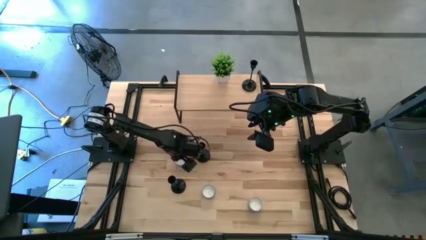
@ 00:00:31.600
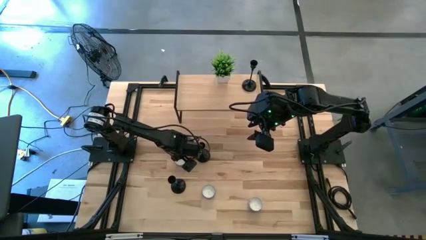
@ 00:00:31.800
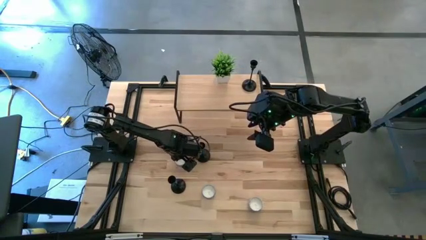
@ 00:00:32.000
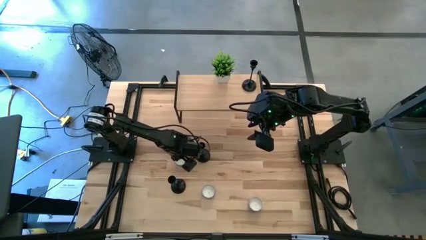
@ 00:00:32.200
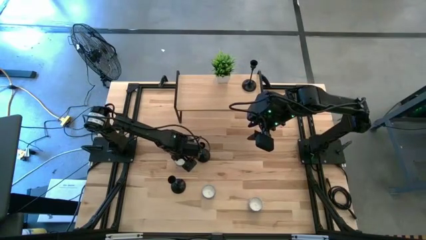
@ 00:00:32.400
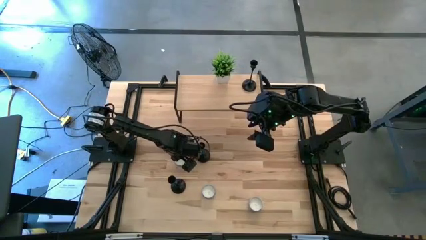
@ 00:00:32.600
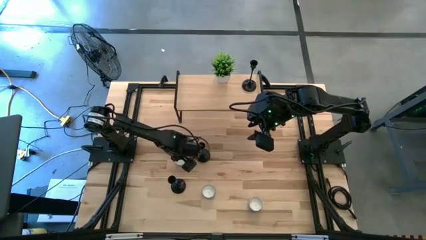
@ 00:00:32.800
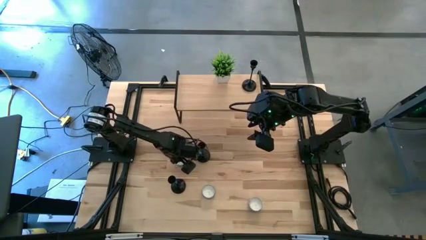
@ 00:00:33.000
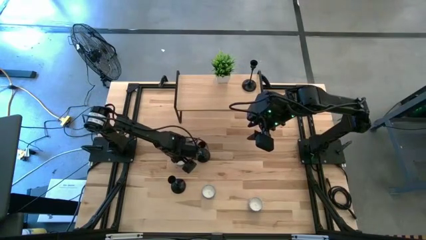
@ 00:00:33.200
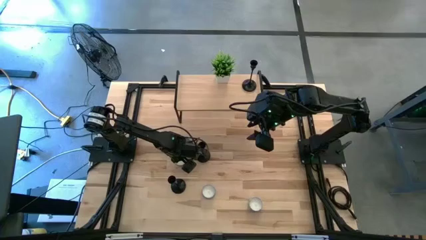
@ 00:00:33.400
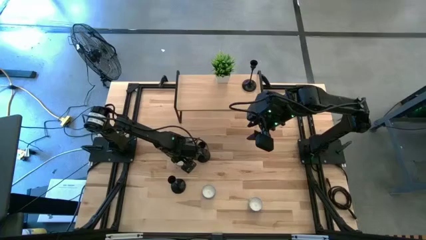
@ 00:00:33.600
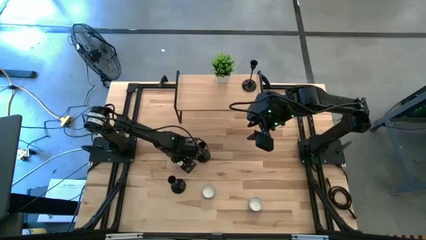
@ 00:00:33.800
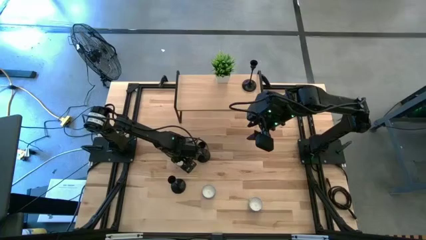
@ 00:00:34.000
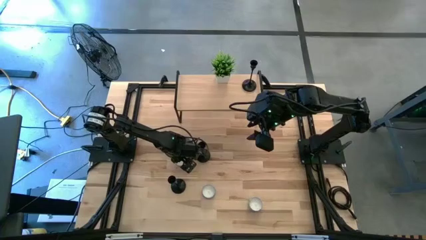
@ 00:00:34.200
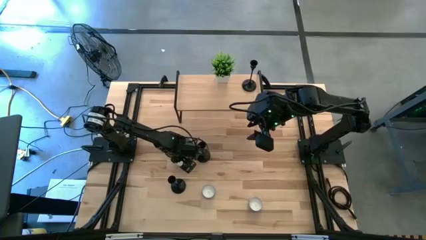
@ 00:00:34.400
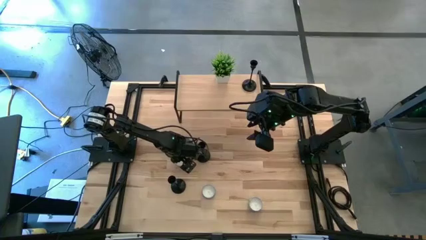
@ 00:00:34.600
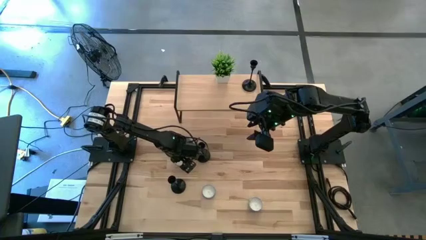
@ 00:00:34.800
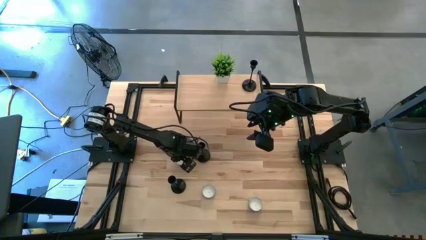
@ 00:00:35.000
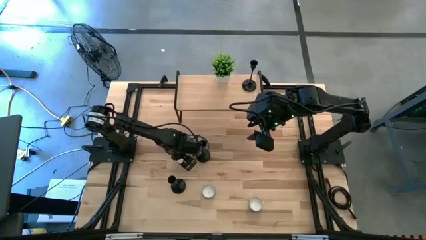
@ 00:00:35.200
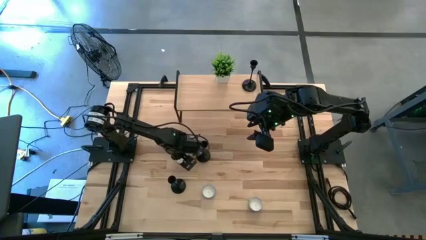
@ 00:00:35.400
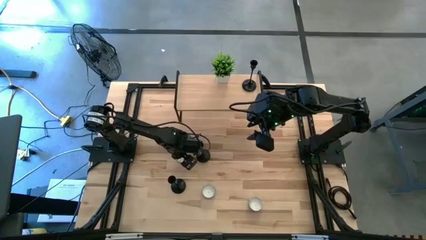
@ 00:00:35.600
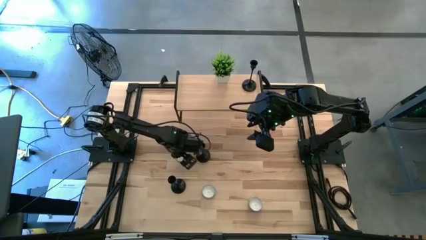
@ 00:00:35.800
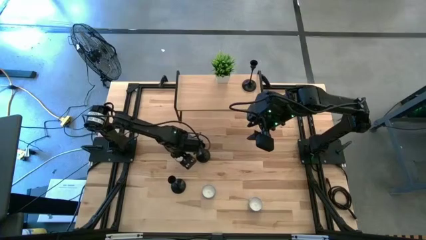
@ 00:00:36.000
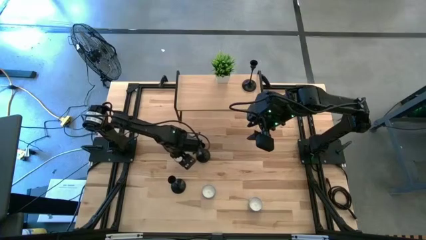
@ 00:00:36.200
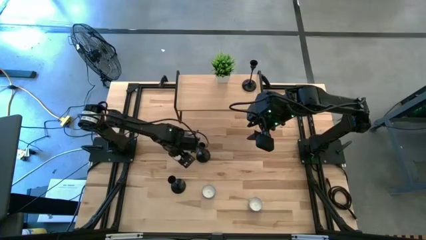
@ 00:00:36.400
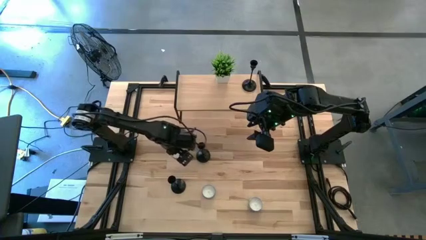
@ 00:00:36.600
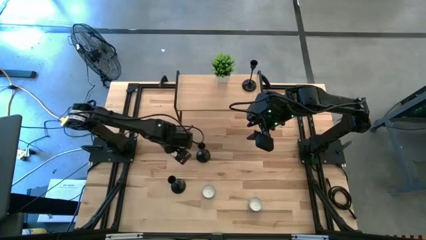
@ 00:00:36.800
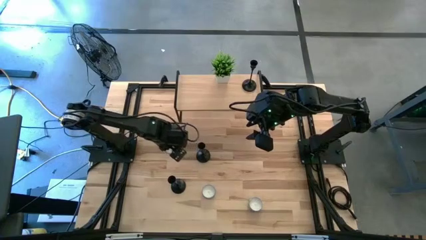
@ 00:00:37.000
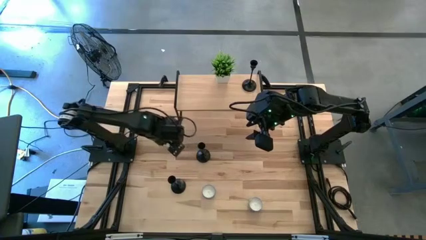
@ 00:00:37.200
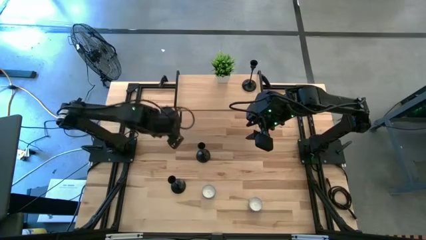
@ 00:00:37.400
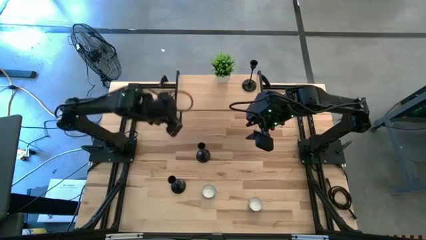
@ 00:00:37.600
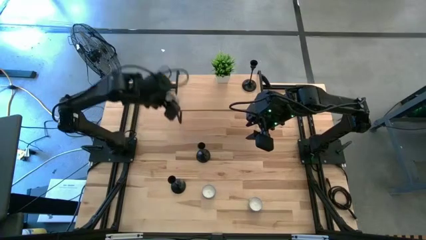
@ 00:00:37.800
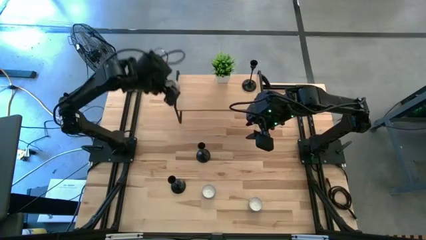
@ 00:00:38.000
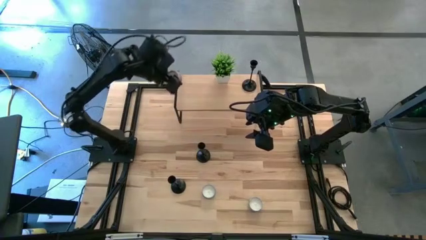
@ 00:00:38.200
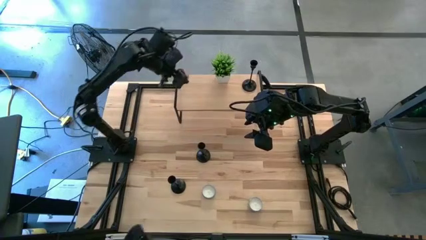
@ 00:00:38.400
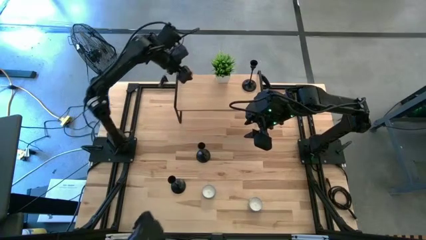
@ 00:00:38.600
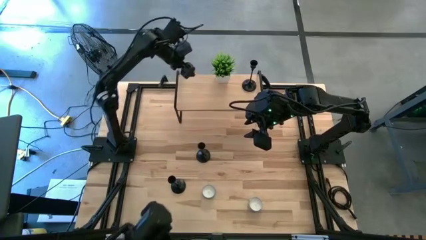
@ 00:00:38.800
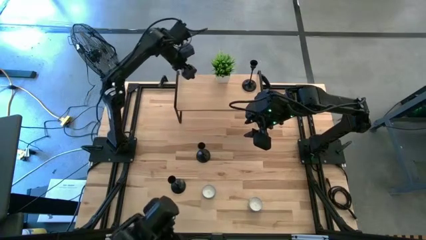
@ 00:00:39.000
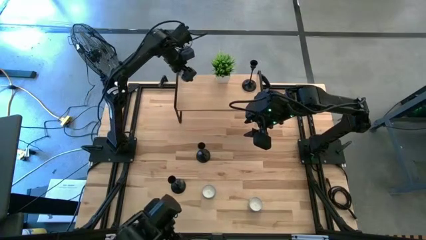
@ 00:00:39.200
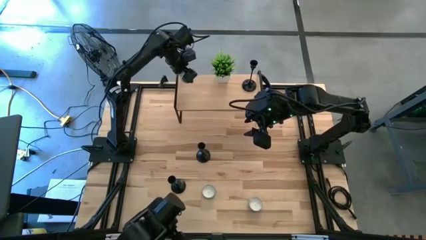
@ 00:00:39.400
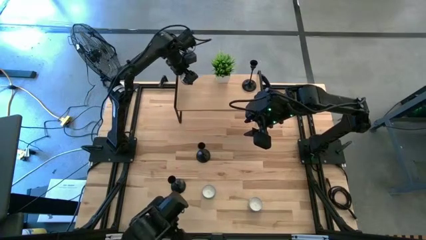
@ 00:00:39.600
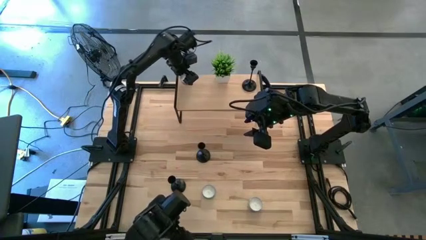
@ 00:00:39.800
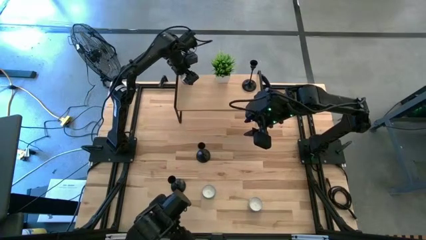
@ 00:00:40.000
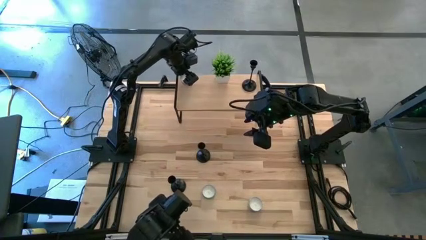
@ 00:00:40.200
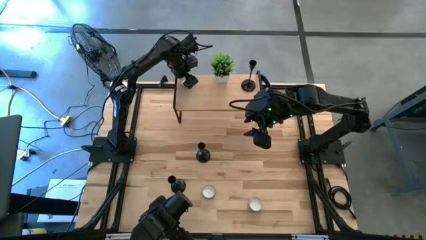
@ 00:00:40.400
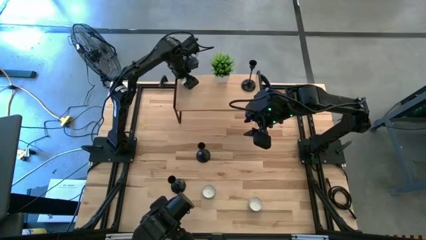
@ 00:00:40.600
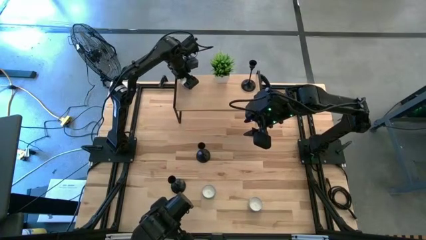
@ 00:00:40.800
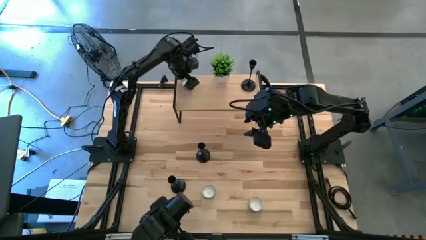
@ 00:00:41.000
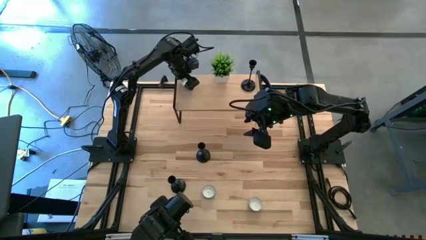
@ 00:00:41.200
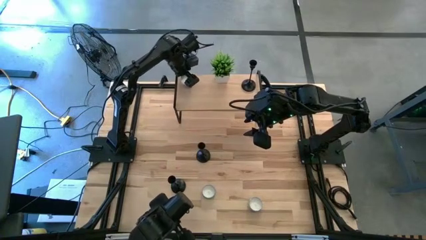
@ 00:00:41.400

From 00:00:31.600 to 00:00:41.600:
Task: Pick & Place candle stick holders
Put the purple pink scented candle on the shelf

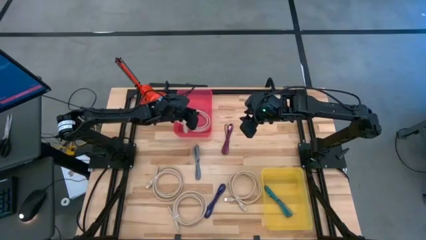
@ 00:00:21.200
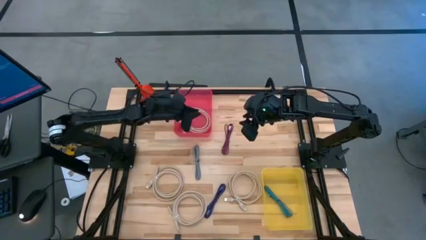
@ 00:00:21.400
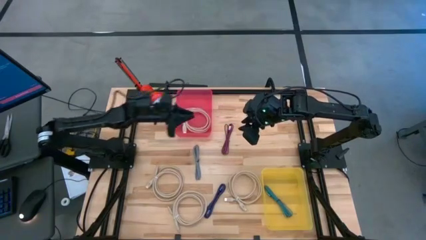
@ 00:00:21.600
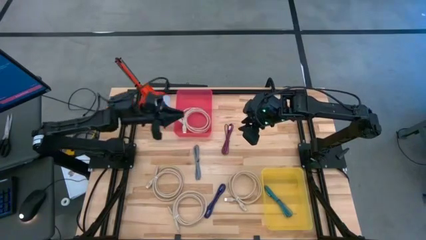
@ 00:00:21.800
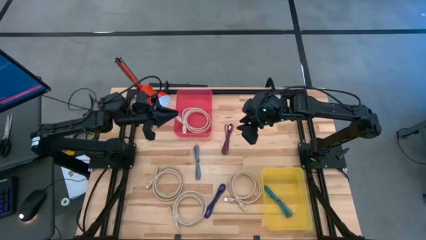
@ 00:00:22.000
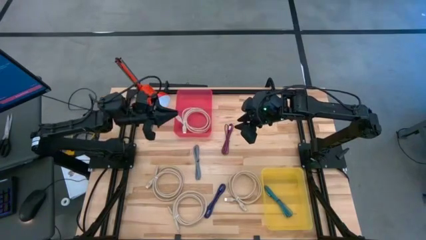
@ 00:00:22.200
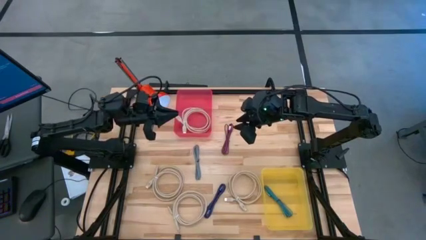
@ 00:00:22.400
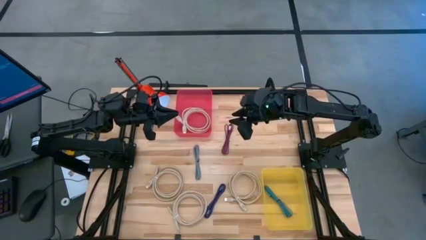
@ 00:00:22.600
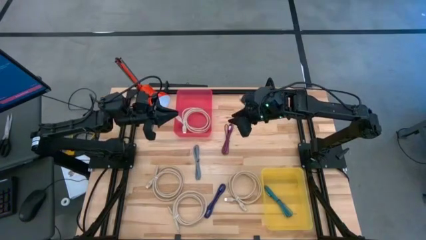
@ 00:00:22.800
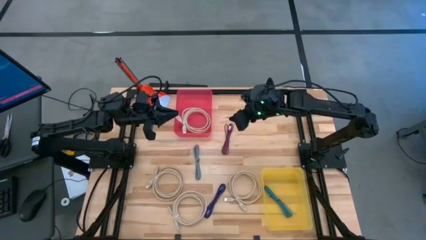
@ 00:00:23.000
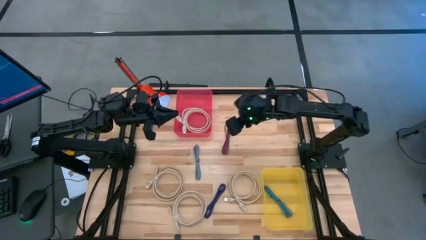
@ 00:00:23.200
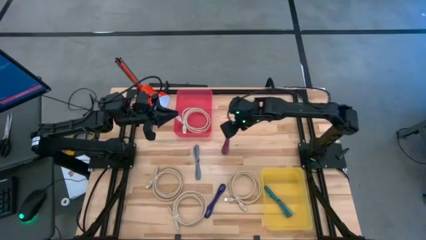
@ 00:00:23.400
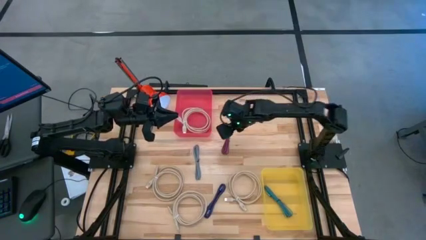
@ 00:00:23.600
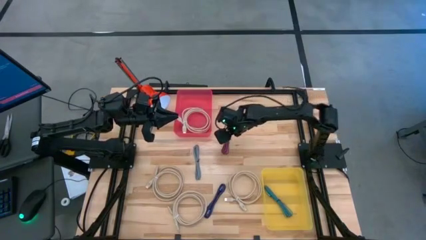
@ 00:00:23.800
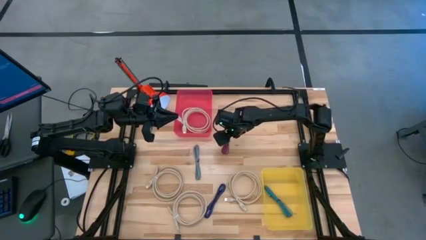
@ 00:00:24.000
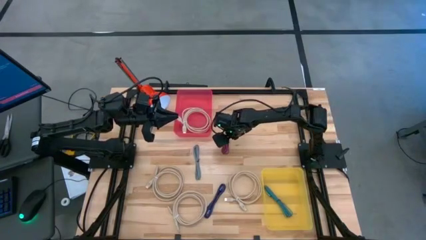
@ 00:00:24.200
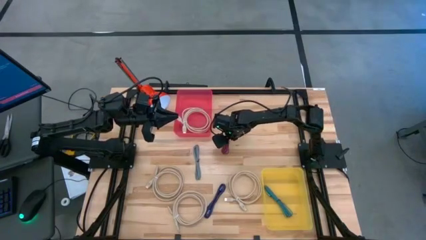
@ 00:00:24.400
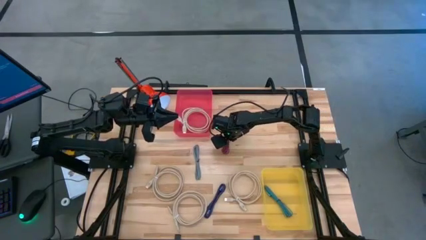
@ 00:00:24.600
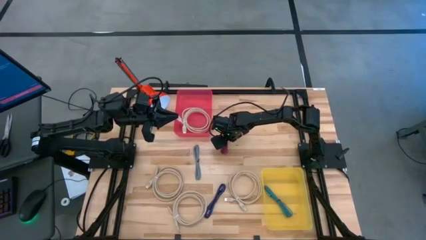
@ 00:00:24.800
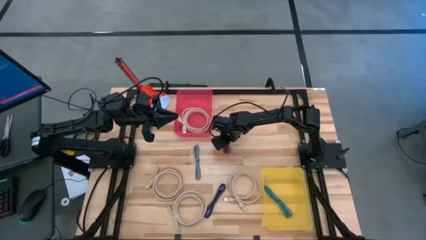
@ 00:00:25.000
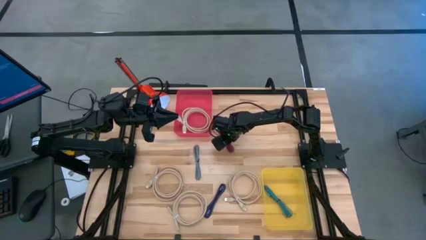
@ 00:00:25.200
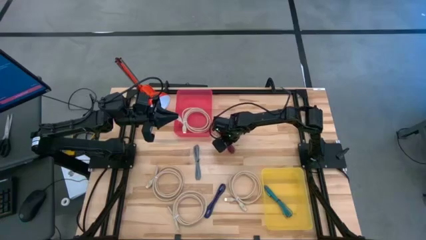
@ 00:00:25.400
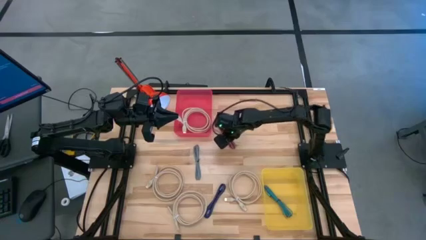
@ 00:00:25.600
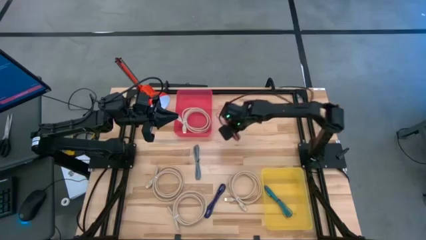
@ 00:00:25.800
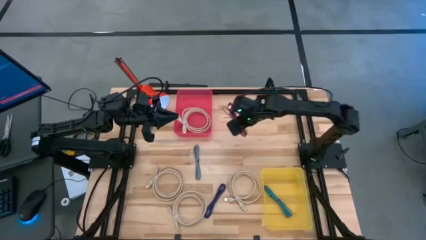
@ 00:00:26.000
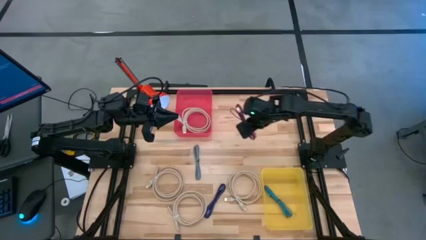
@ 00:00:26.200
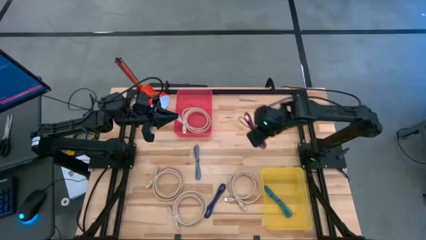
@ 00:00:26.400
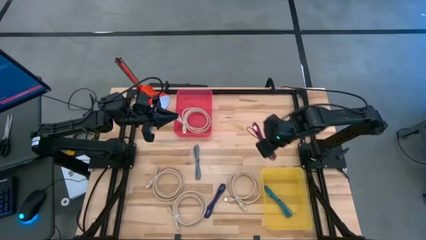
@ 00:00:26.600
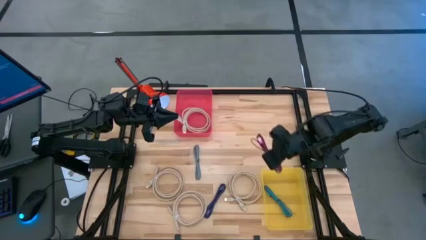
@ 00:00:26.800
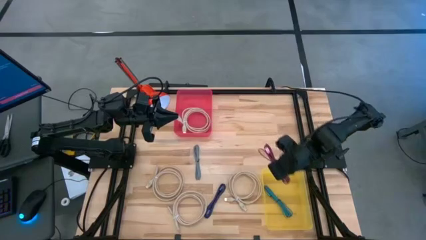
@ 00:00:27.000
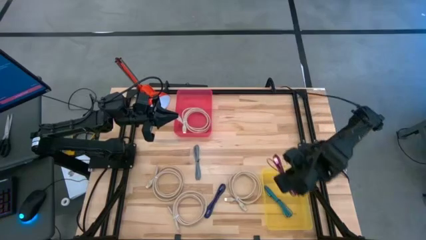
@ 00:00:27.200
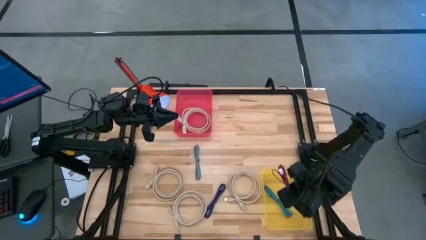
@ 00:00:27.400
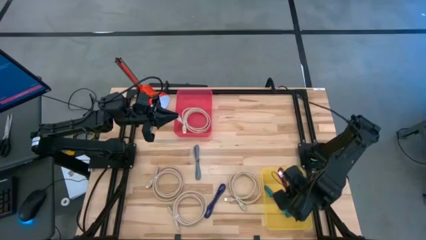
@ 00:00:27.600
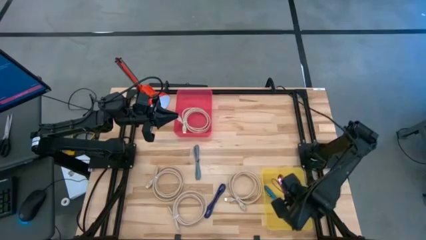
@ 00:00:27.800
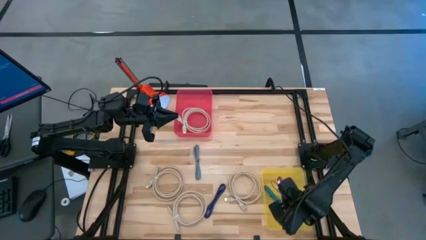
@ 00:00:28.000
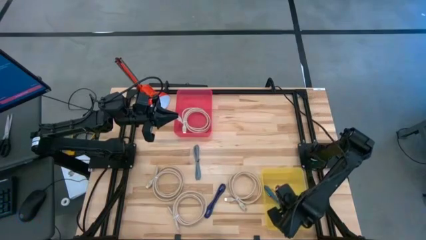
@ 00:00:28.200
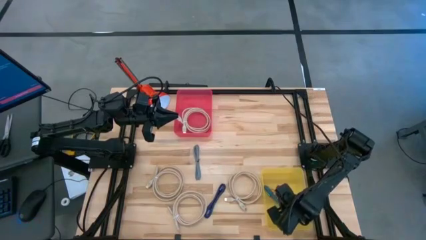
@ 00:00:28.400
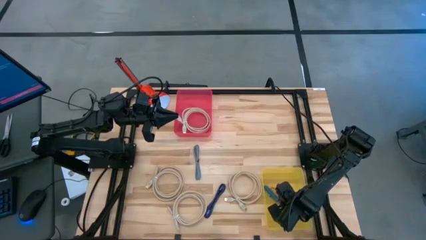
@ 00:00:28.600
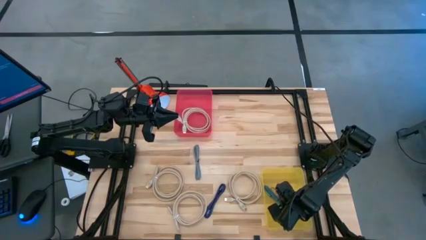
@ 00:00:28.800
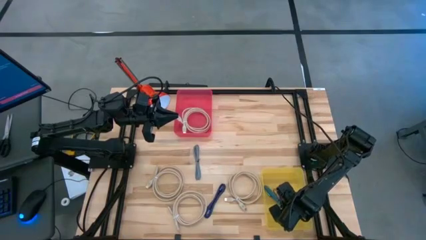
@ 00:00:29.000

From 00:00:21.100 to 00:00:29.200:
Task: Pick & Place USB Port
Put the purple charger cable into the yellow bin
